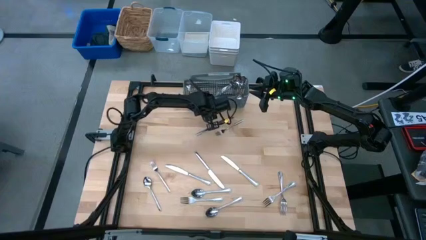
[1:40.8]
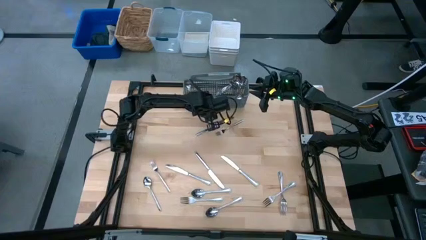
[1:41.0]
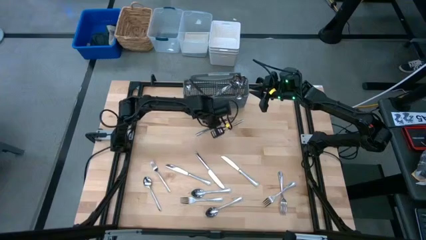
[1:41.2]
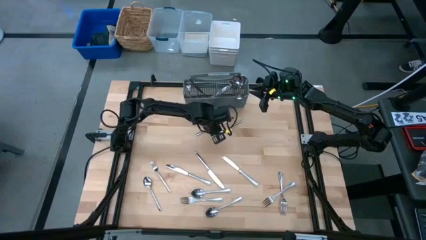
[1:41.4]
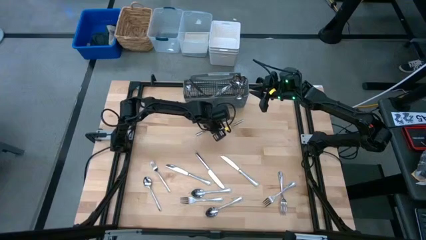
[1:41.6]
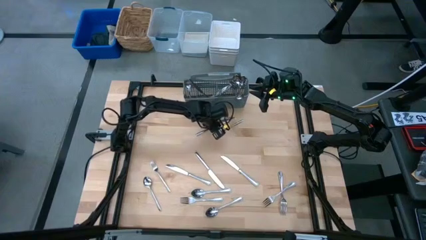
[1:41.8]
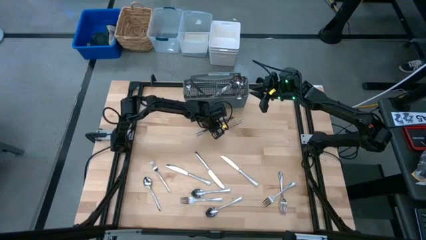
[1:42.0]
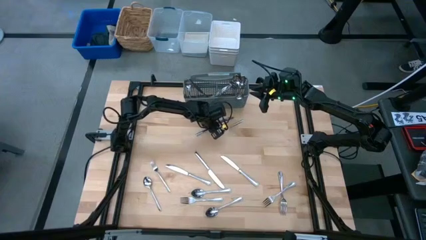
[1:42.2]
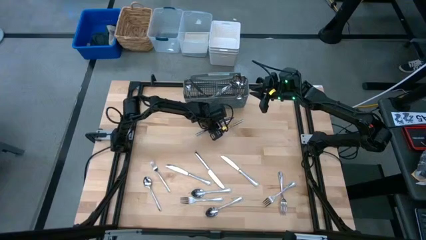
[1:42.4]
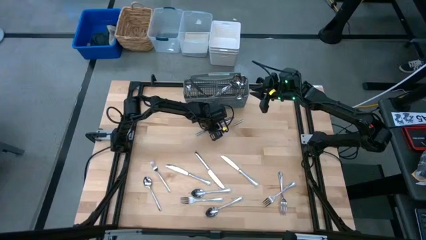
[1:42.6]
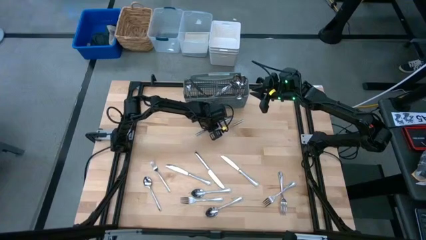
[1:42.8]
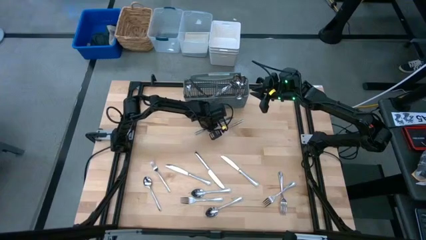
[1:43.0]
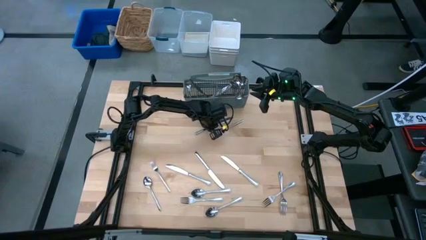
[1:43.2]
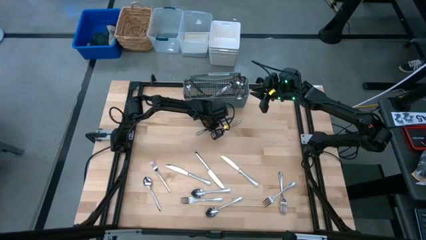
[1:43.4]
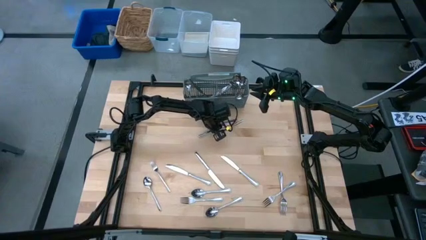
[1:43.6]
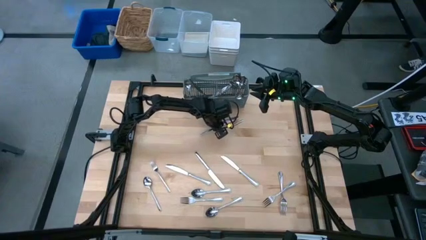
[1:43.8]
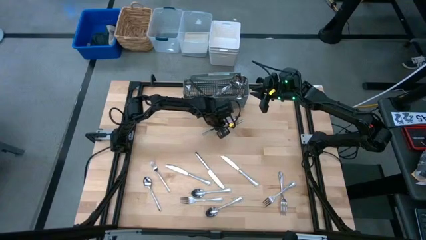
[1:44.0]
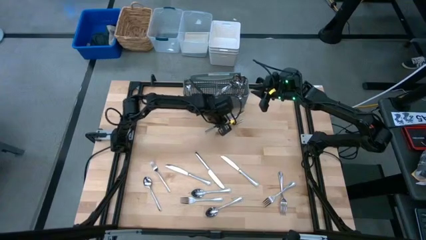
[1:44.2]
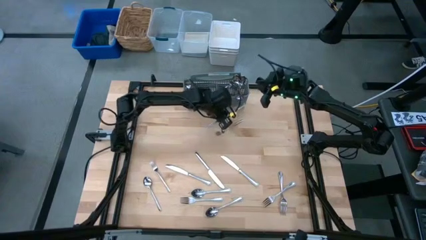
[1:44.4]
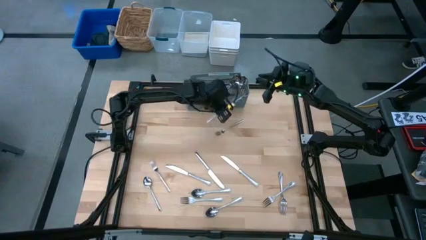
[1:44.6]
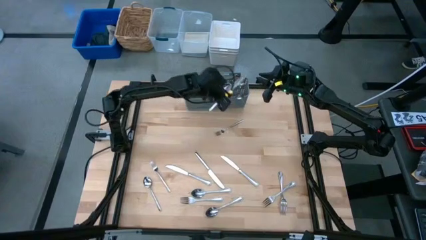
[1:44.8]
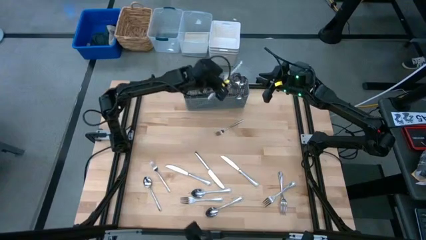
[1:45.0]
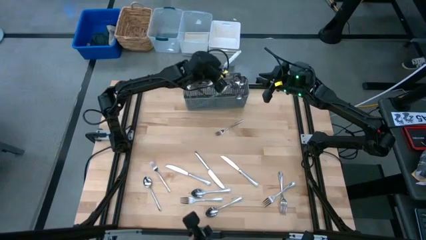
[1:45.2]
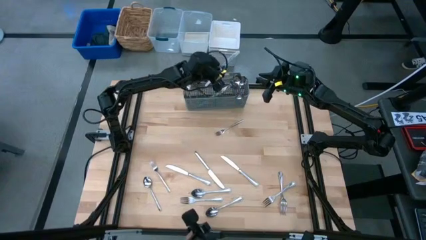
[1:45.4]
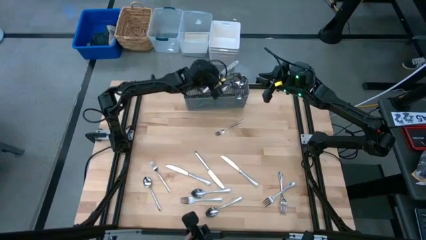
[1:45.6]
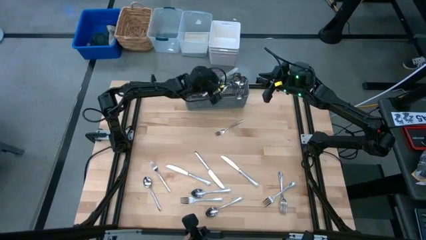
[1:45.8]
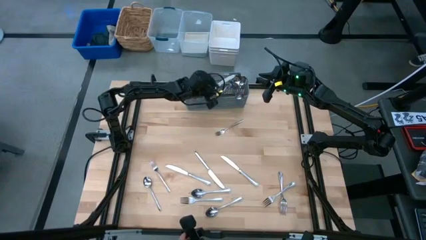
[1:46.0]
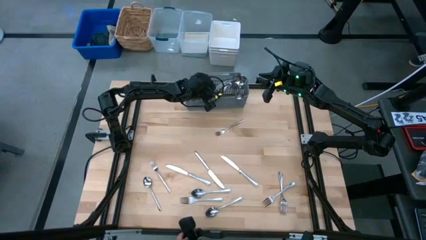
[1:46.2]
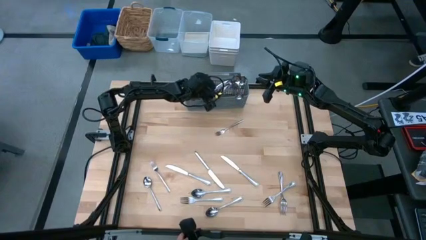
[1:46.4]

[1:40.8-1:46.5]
Put the silver knife into the dishwasher utensil holder

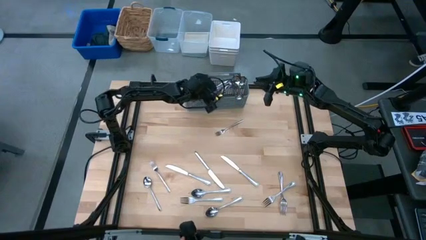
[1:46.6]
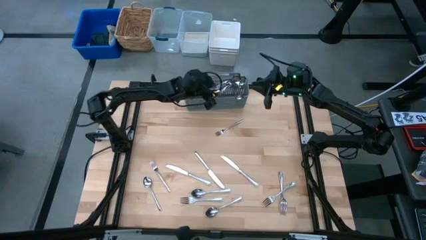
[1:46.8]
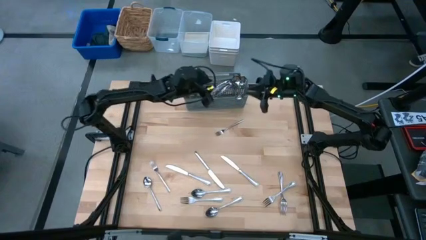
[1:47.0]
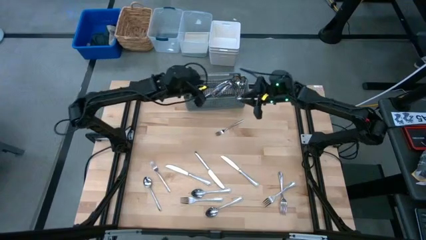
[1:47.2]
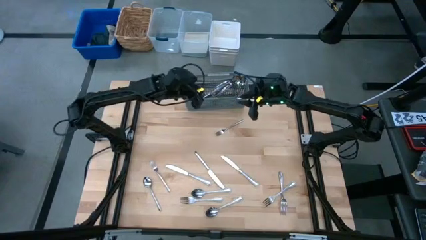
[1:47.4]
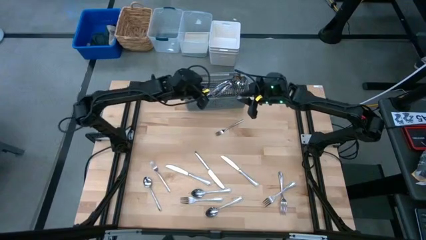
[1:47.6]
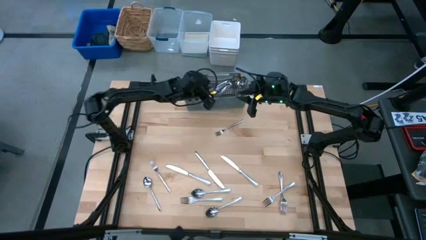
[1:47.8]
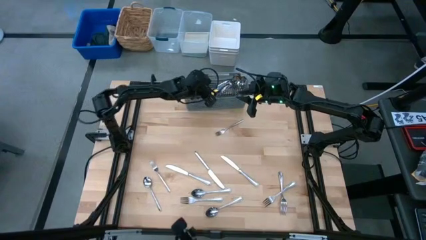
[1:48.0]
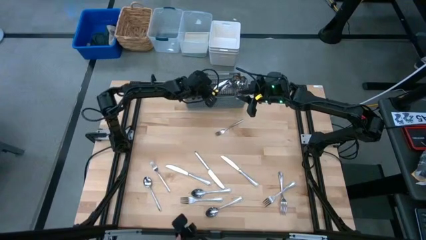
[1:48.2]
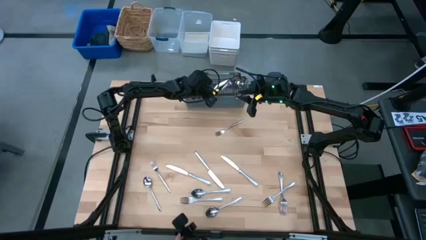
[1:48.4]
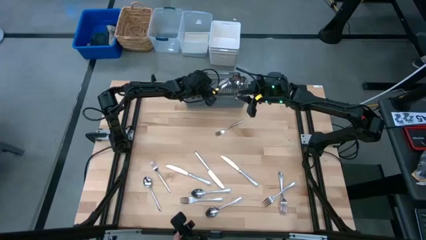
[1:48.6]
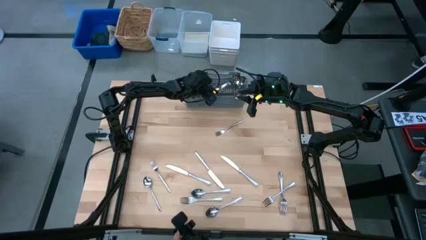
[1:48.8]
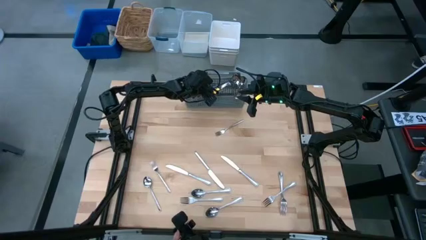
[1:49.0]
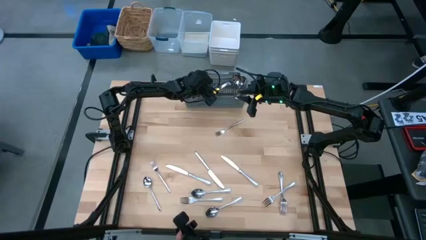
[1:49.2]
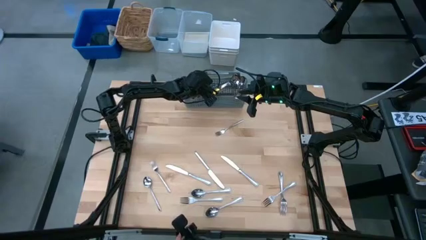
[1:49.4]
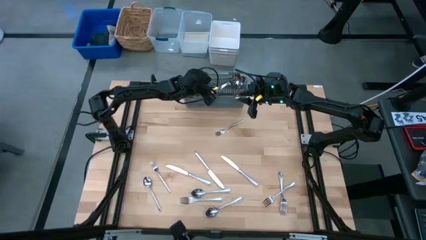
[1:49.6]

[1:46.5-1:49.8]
Adjust the silver knife in the dishwasher utensil holder

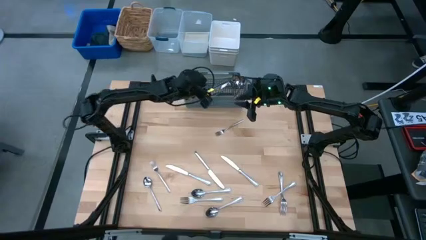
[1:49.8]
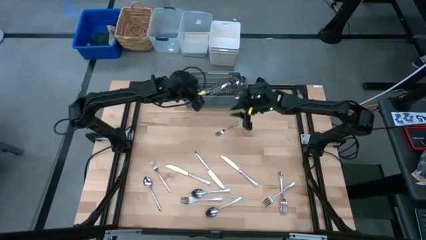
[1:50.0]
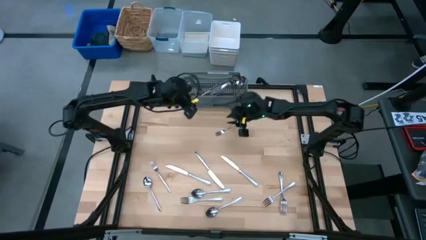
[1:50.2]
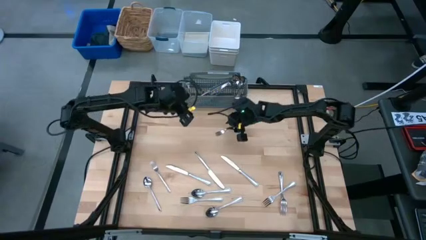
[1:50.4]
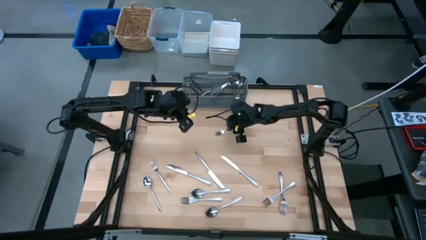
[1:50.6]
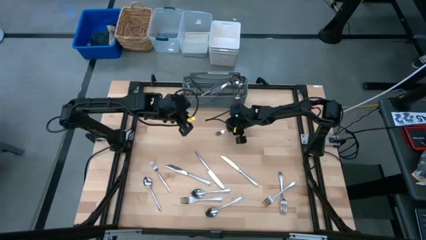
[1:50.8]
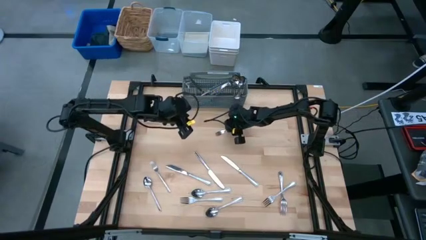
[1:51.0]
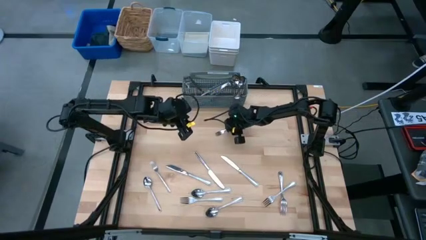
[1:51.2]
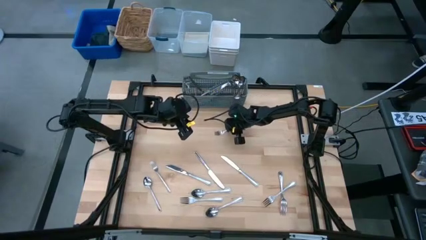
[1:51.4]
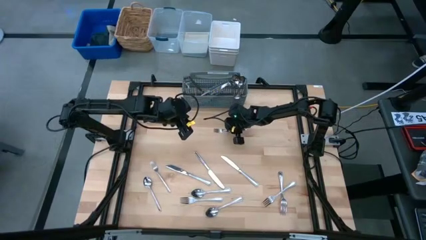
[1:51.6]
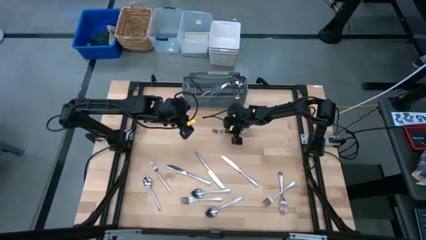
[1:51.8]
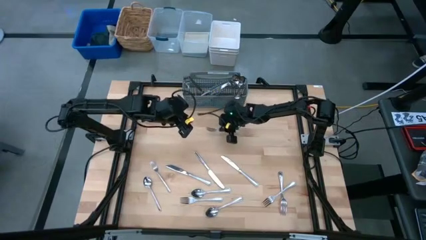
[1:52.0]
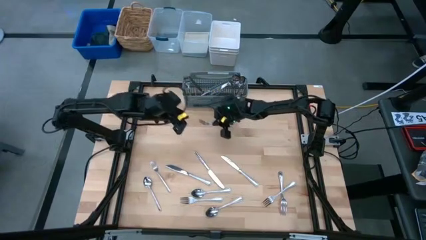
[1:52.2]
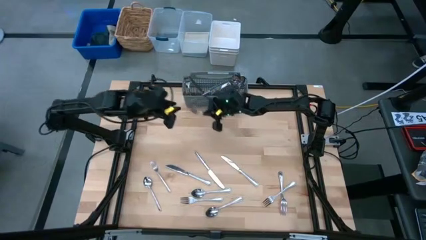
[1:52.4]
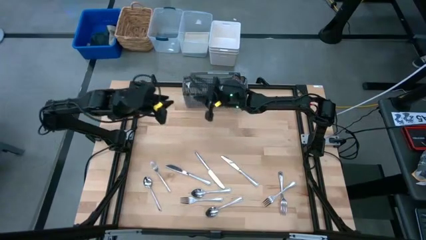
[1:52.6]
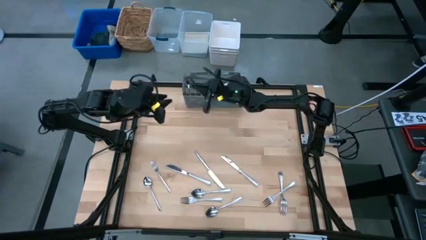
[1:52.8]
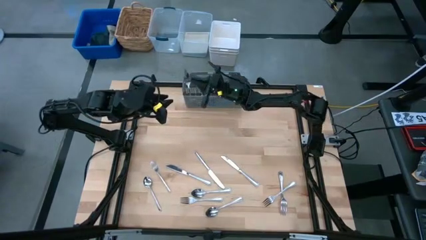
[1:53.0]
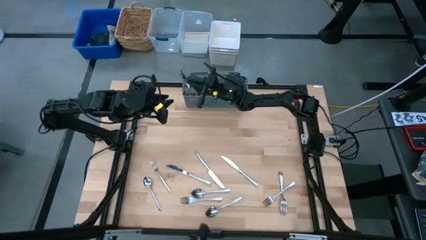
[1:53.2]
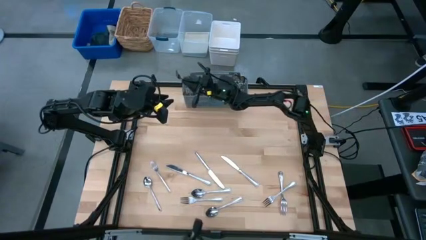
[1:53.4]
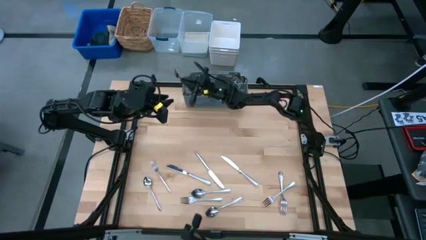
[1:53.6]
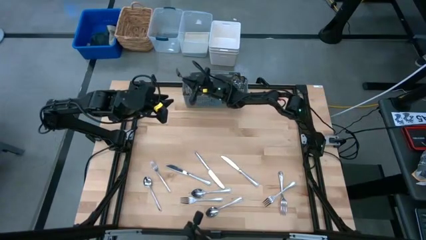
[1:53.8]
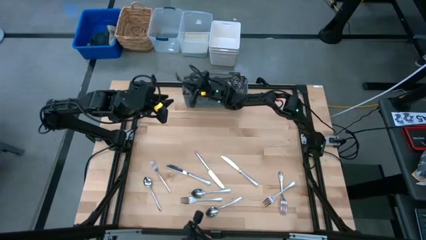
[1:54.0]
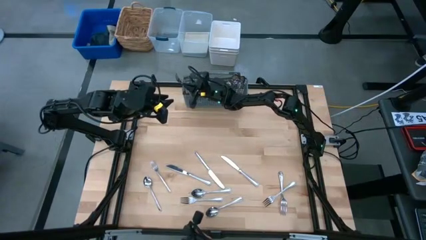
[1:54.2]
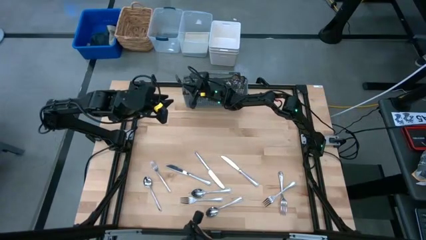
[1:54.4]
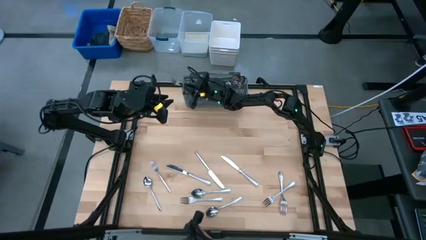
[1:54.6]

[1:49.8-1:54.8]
Put the silver fork into the dishwasher utensil holder

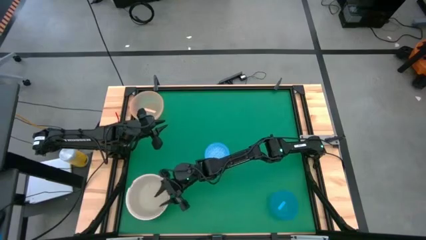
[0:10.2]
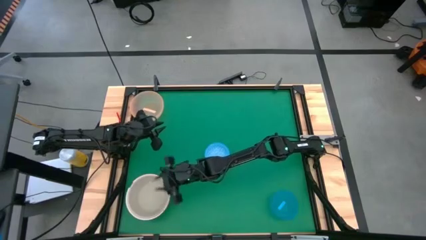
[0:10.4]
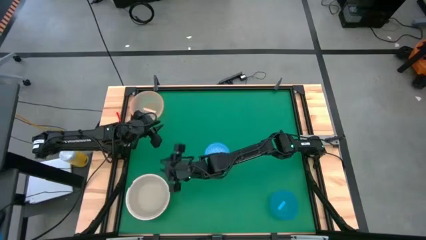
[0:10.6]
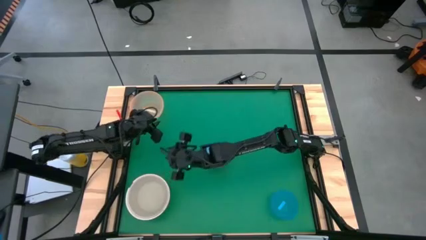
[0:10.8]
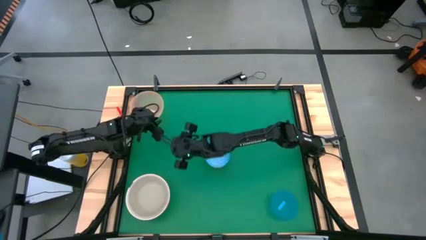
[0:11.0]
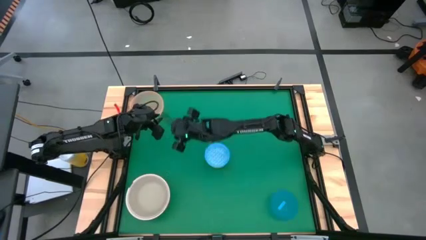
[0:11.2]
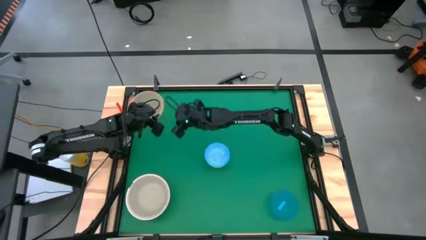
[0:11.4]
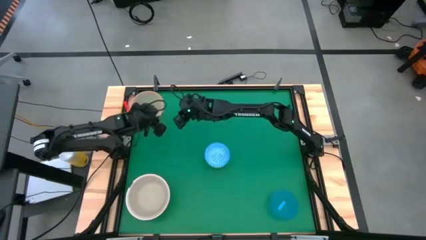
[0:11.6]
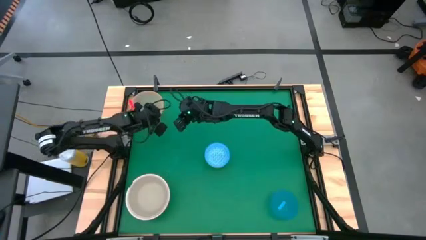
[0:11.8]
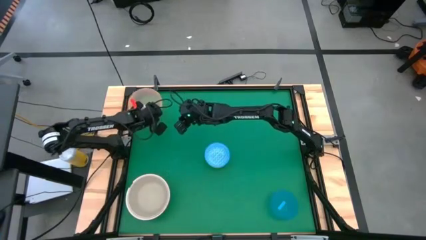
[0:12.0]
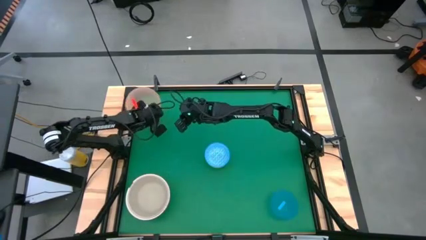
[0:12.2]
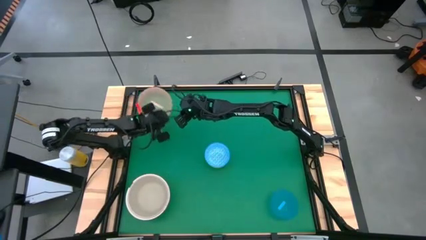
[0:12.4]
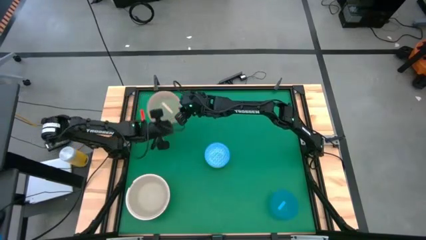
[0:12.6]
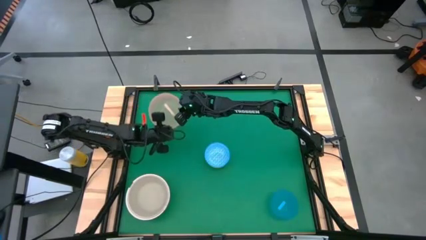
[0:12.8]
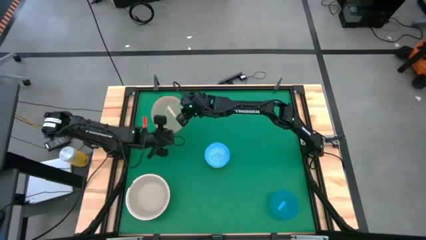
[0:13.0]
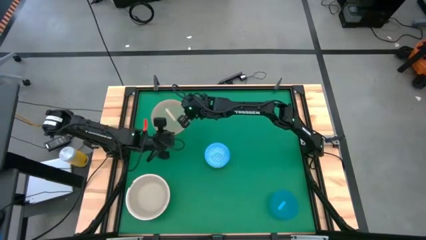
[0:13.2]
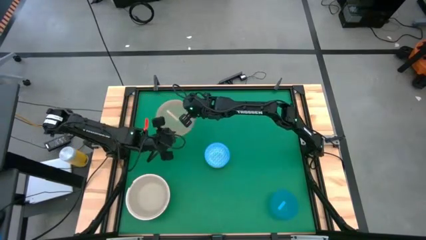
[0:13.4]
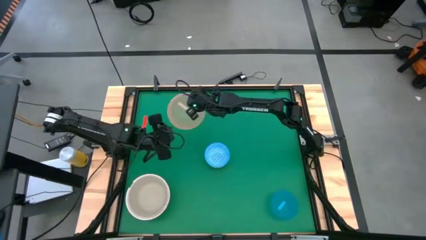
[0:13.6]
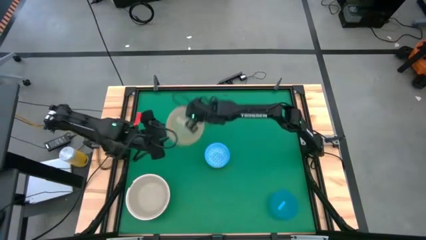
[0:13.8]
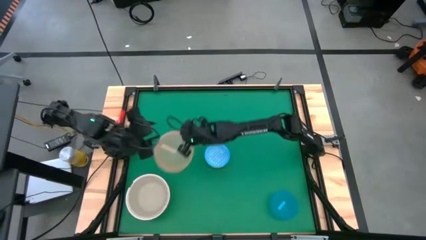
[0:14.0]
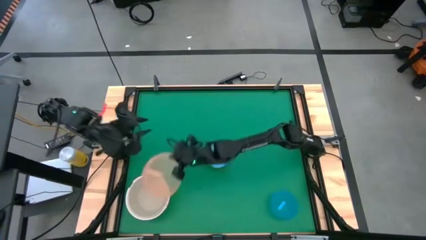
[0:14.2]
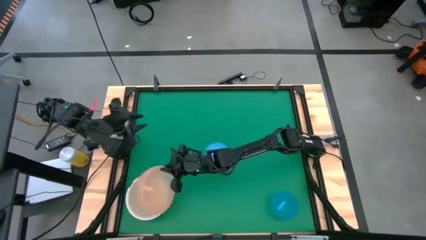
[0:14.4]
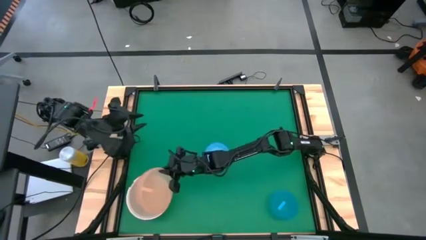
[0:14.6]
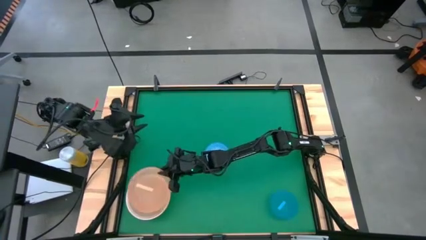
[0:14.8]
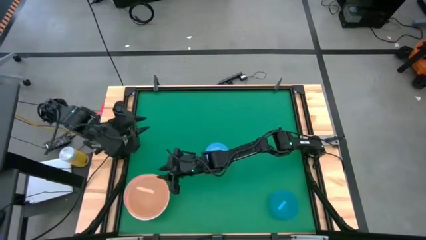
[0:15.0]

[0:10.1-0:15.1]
Stack the orange bowl on top of the gray bowl
